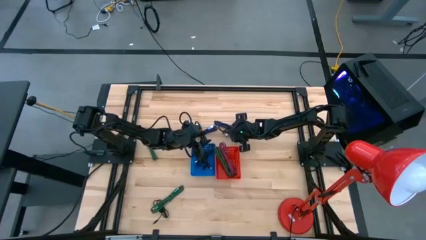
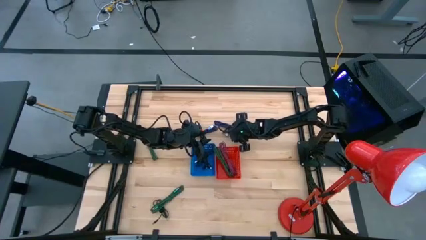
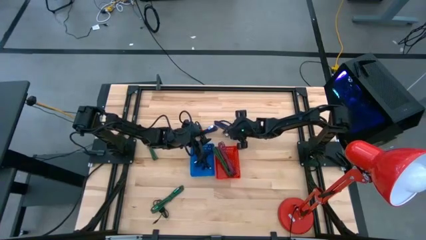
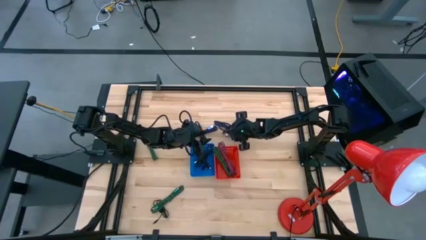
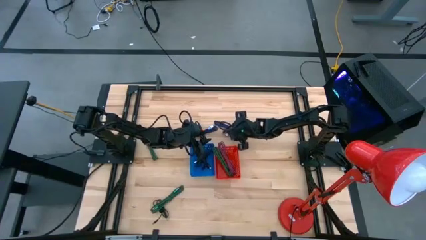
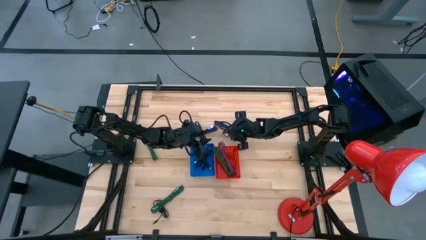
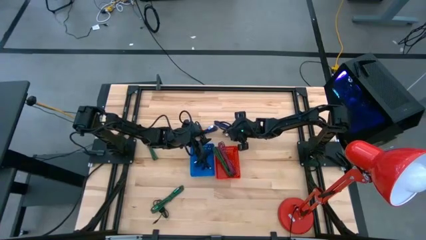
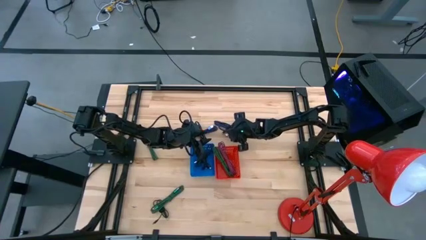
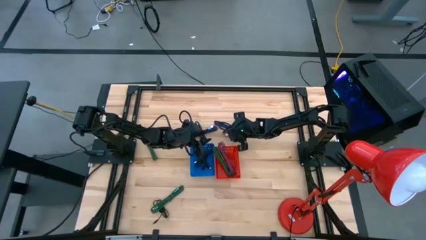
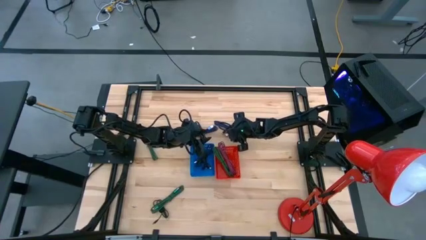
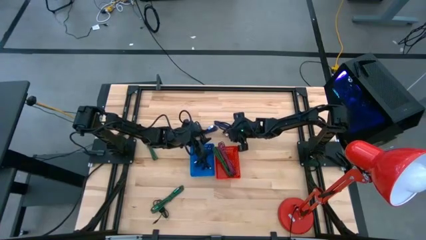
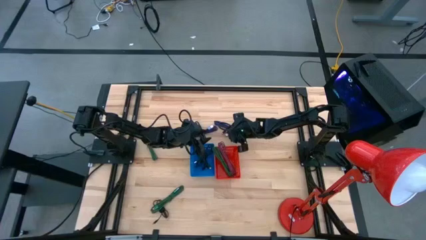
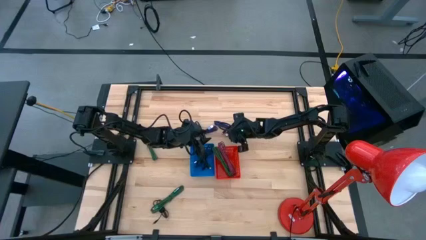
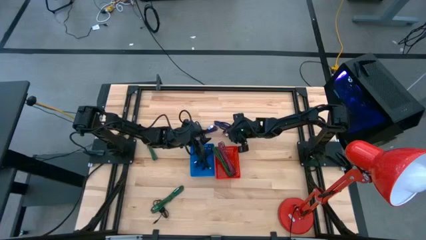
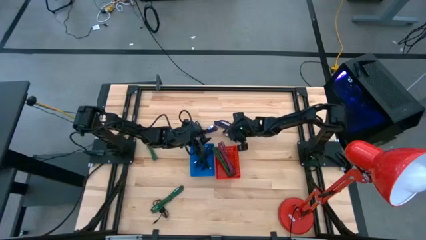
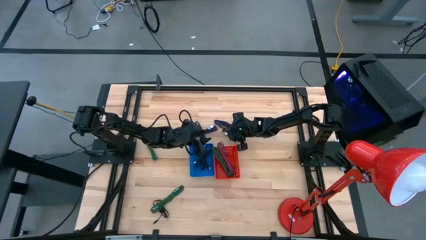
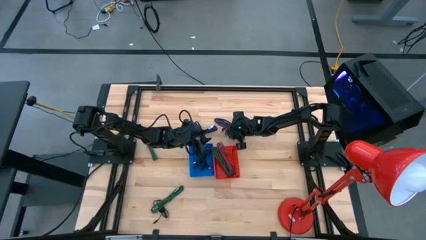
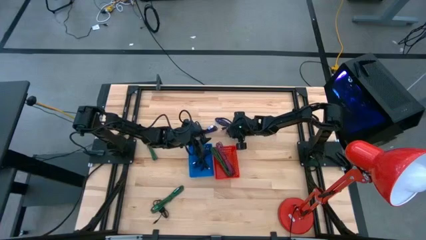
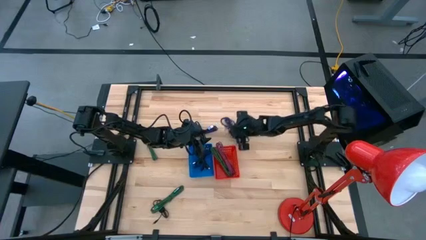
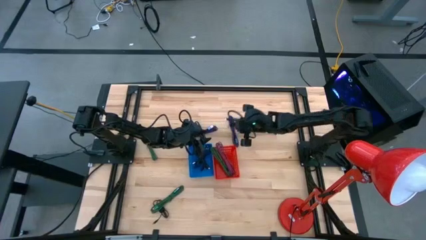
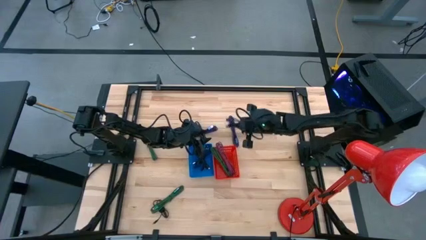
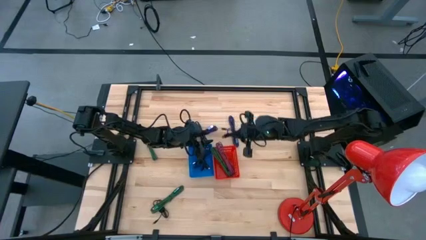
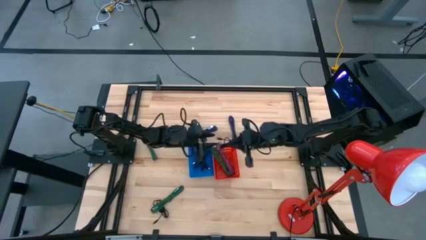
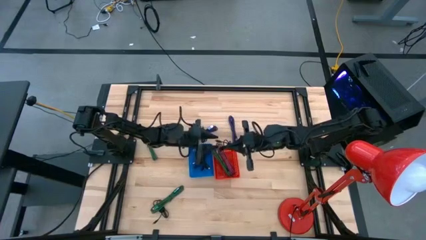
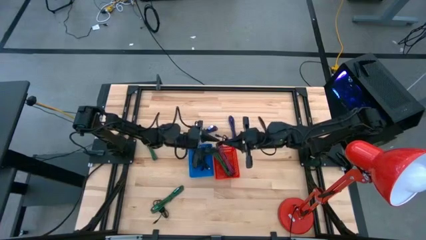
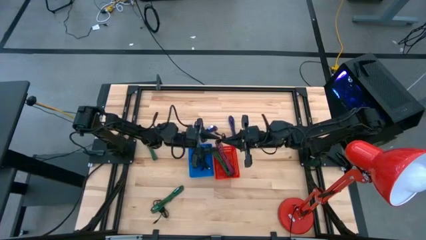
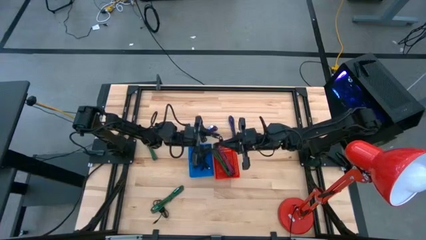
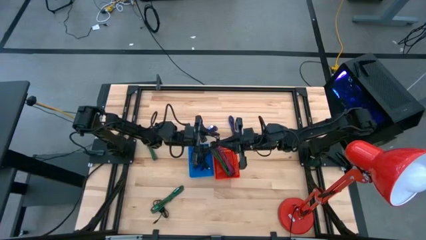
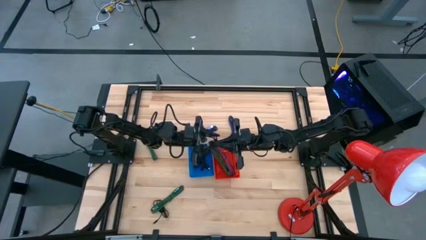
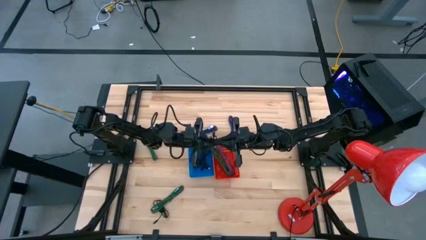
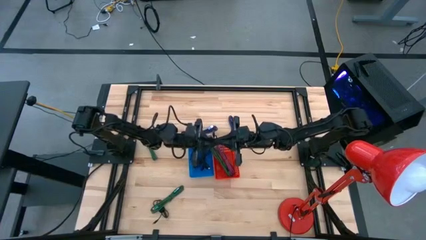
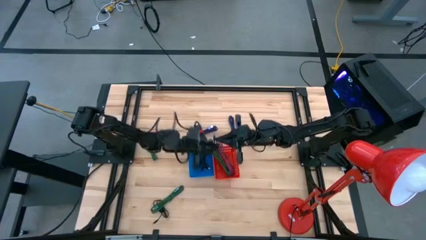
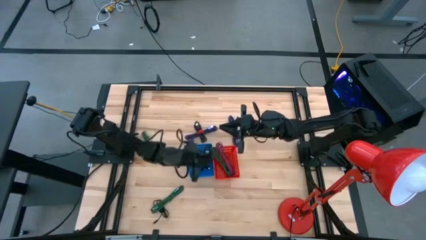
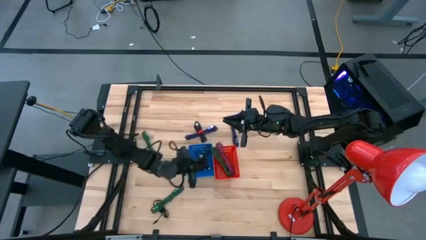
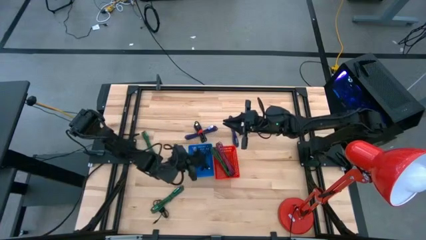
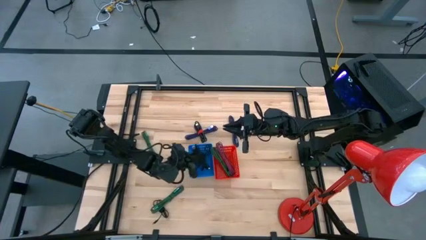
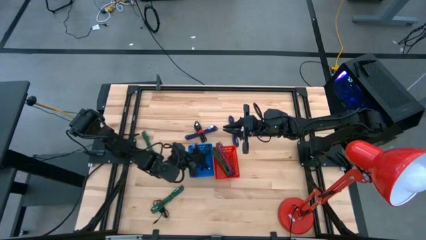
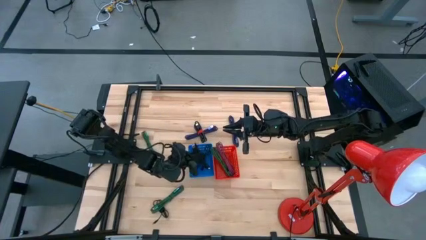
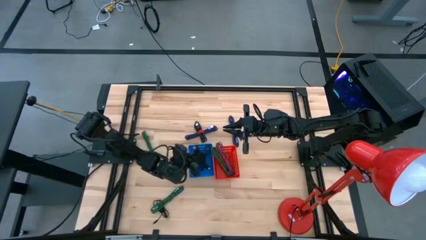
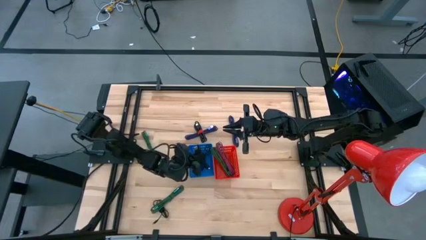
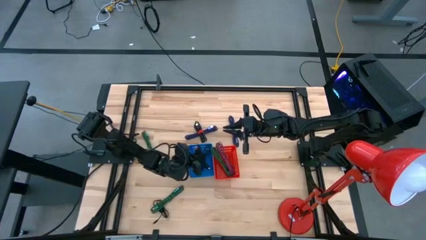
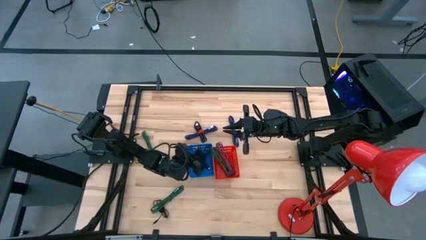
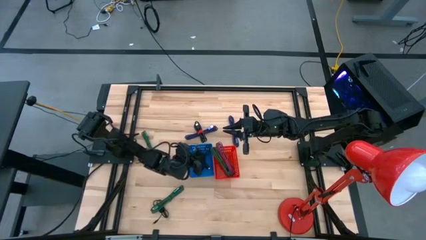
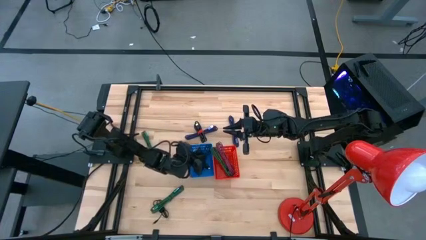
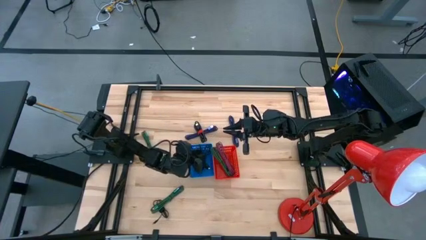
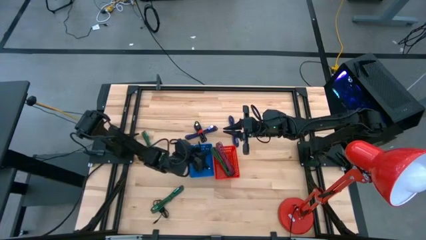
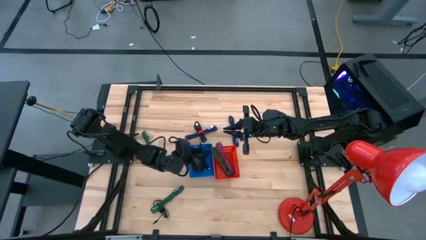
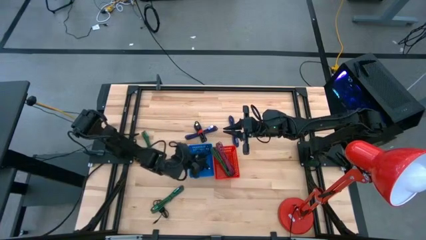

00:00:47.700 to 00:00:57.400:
Task: Pick & Place USB Port
Put the black USB cable into the blue basket

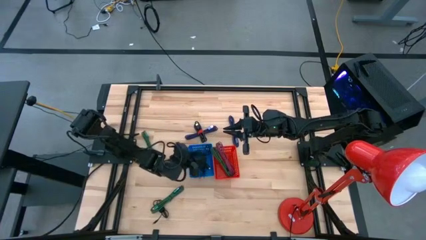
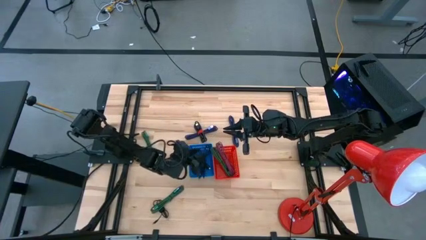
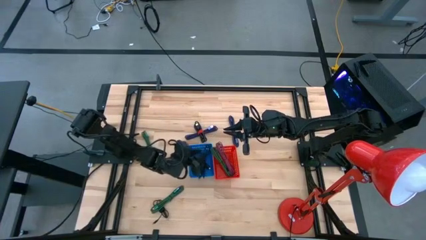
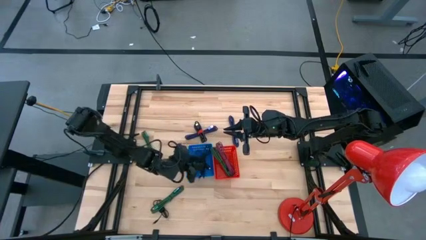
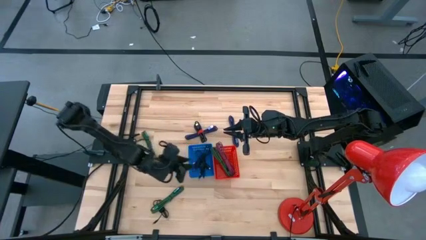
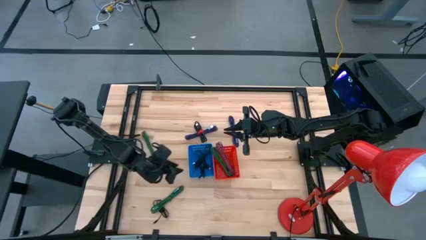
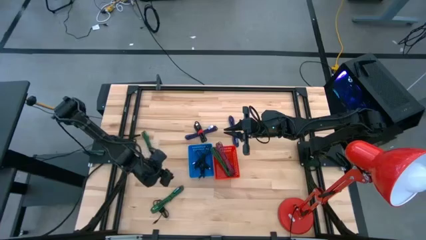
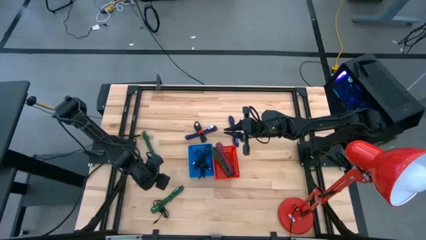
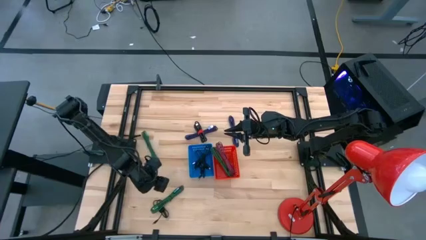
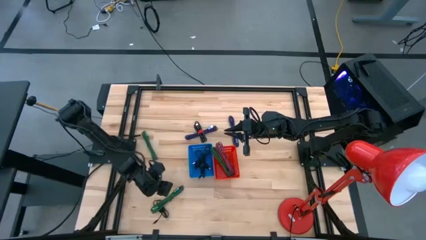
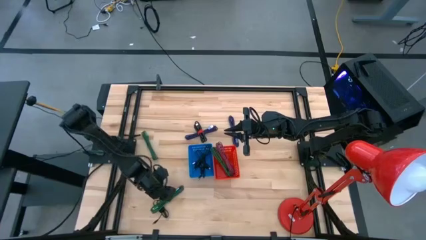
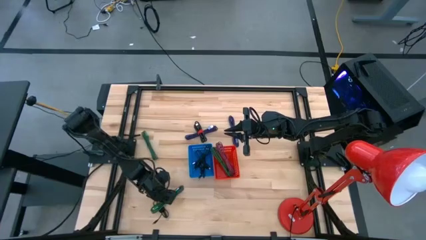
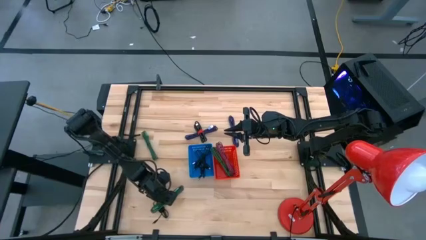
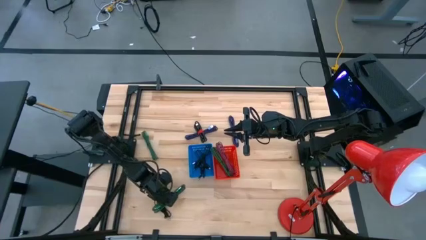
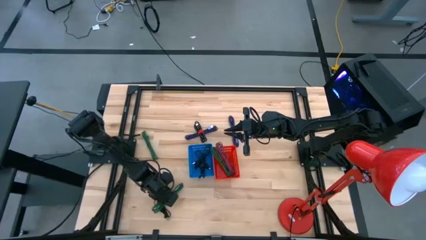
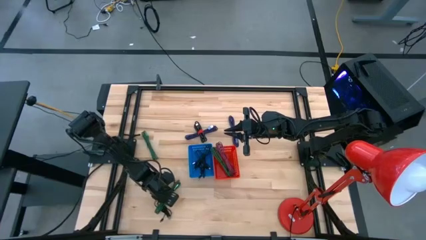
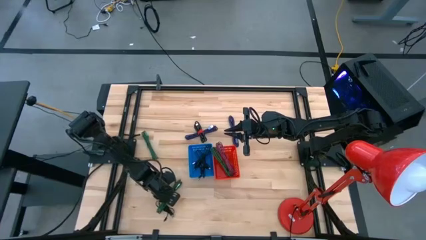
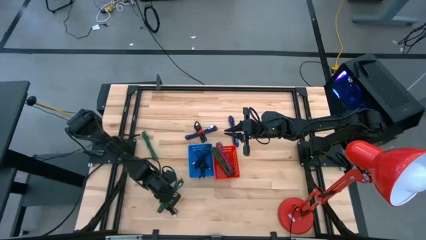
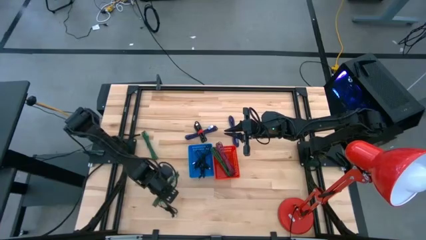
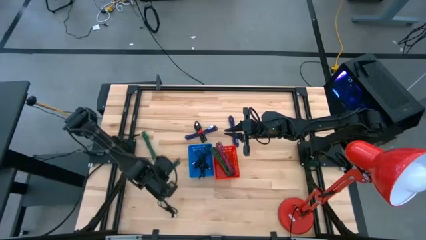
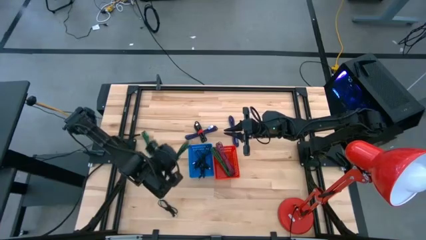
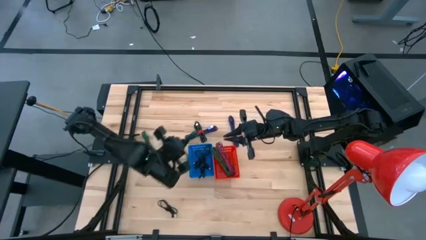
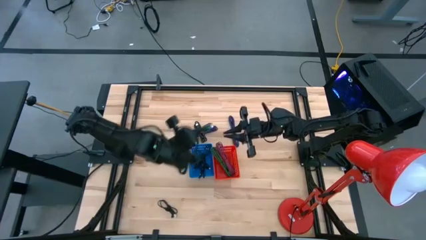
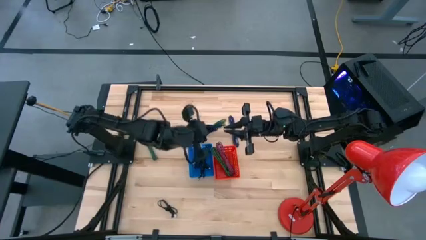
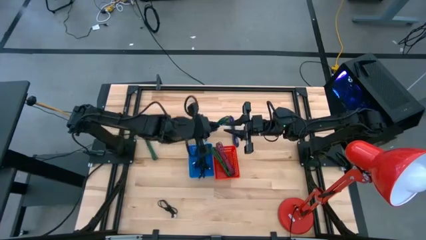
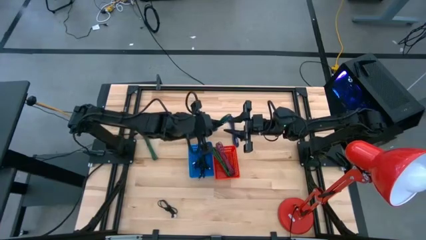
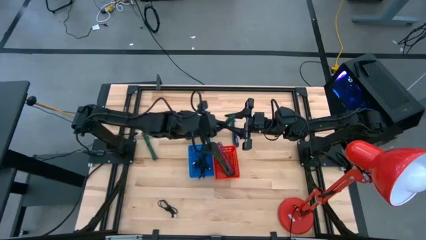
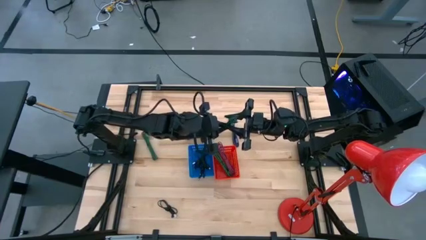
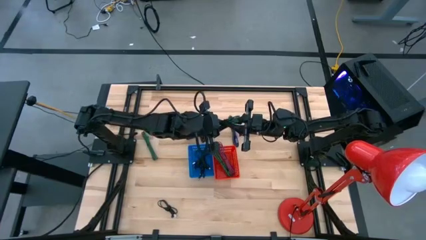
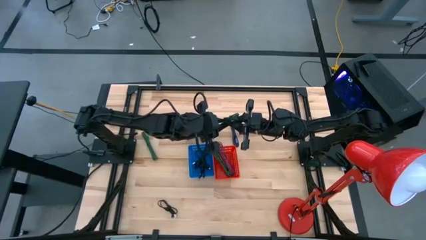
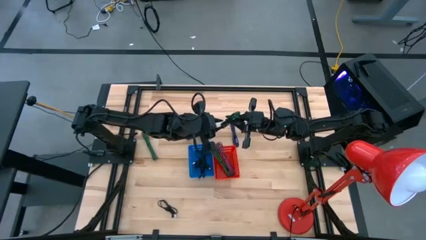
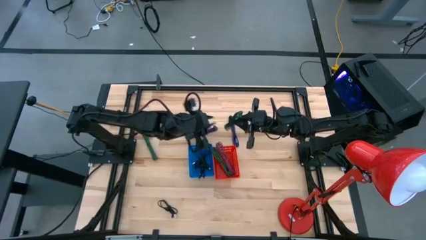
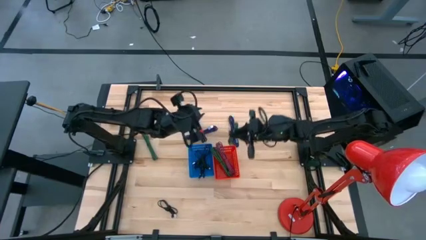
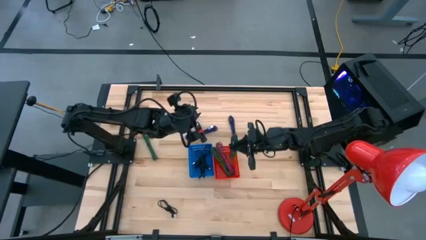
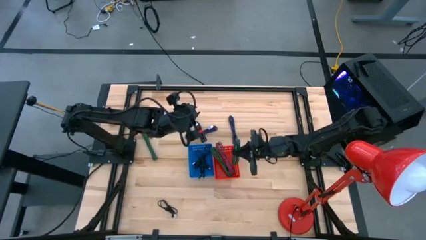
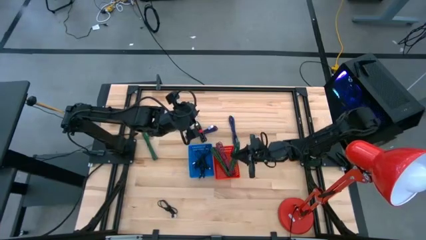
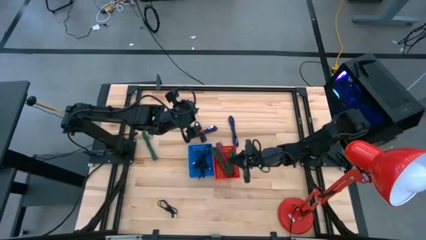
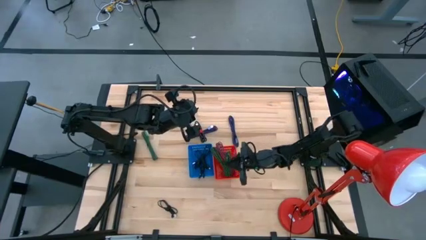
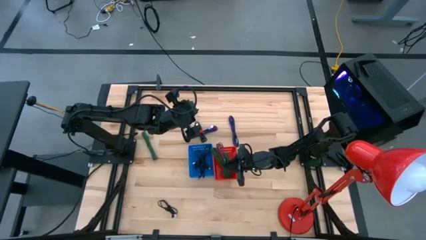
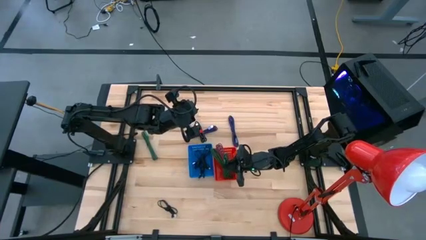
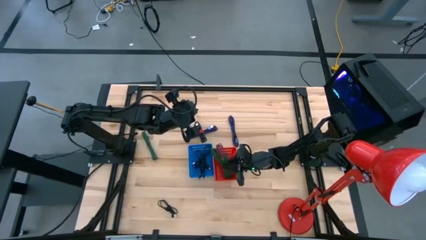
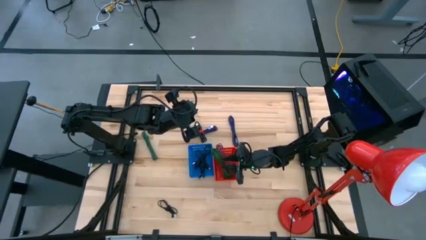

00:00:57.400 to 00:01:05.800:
Put the black and green USB cable into the red basket
